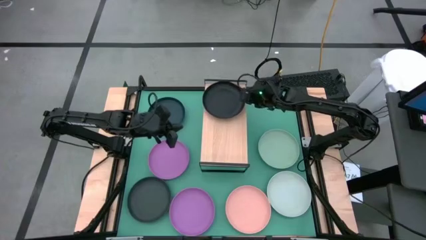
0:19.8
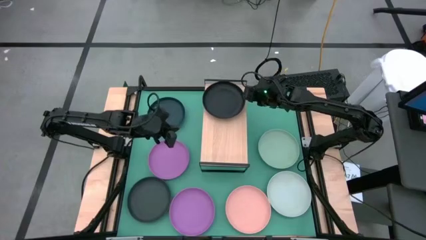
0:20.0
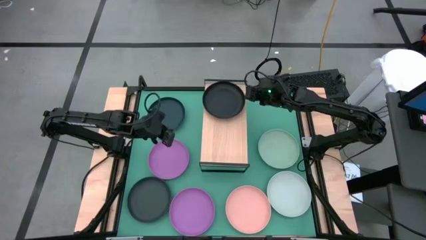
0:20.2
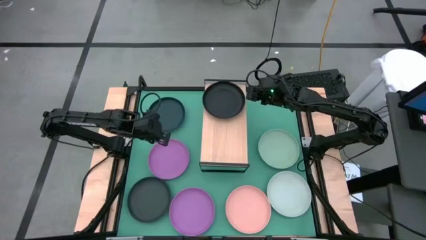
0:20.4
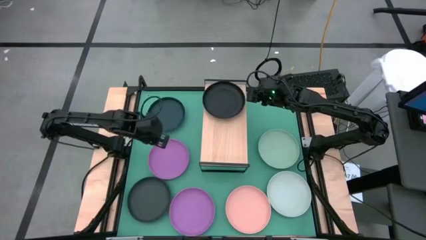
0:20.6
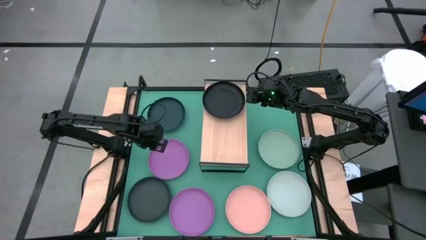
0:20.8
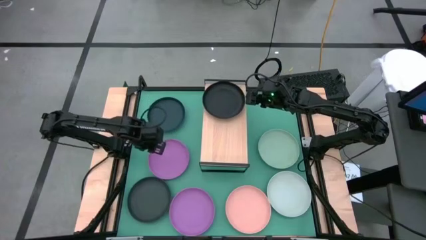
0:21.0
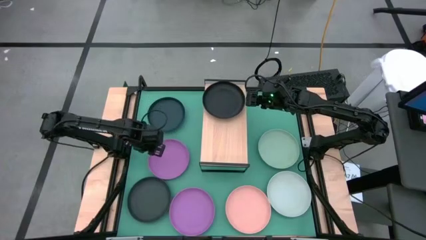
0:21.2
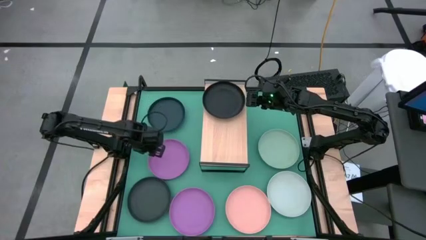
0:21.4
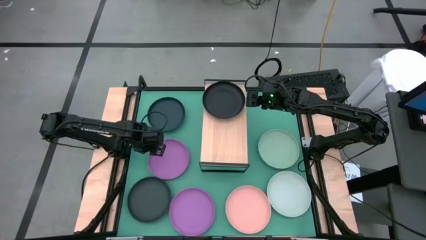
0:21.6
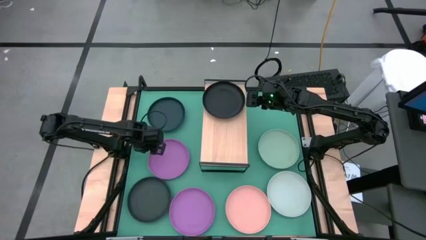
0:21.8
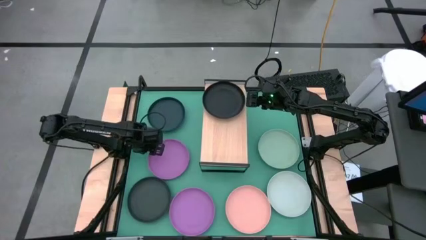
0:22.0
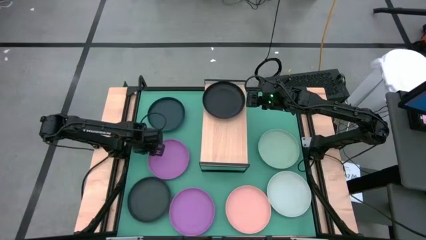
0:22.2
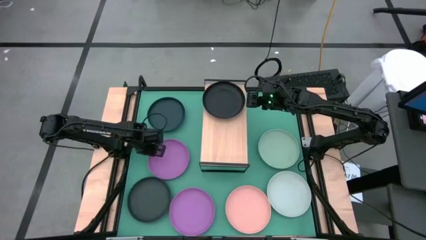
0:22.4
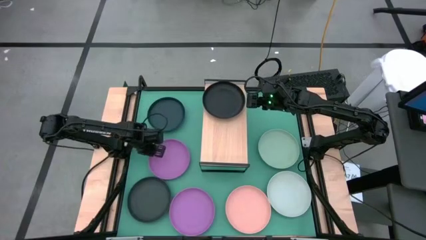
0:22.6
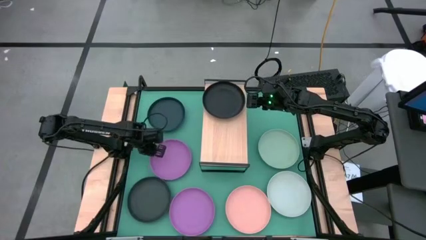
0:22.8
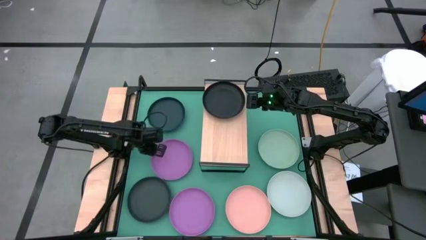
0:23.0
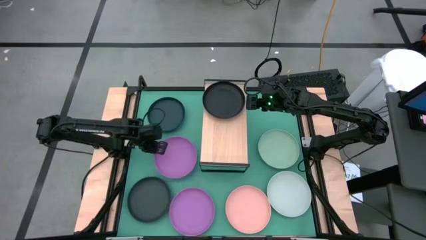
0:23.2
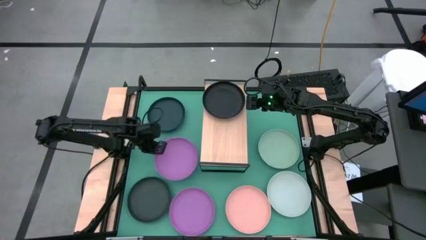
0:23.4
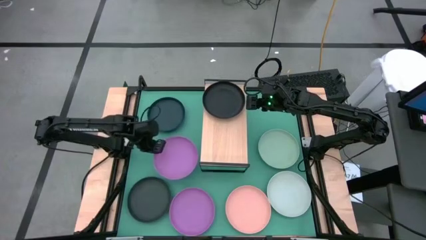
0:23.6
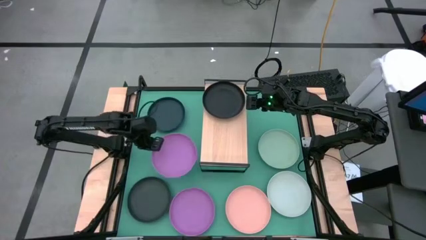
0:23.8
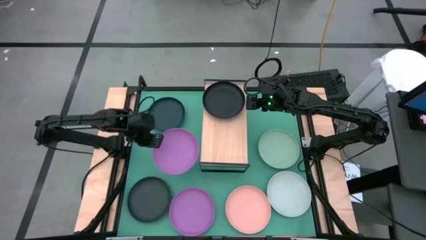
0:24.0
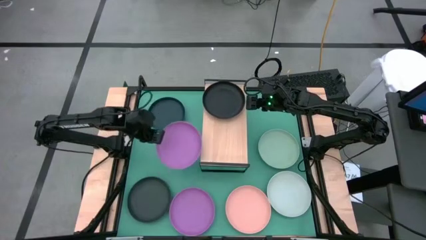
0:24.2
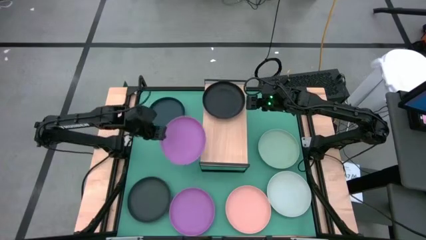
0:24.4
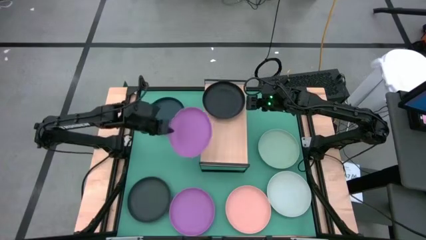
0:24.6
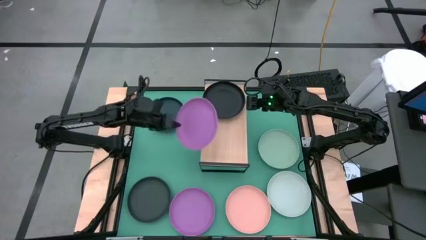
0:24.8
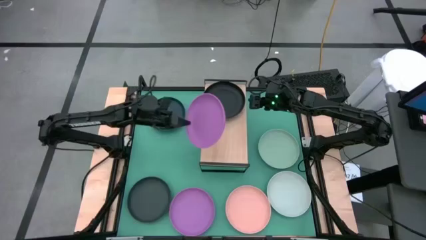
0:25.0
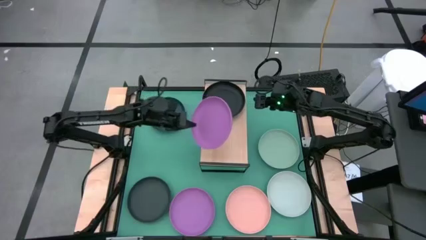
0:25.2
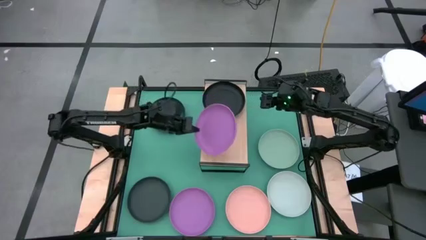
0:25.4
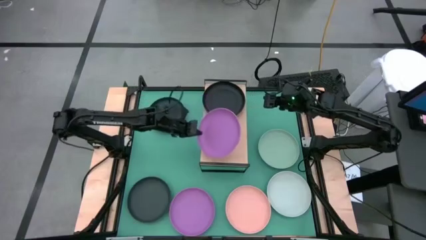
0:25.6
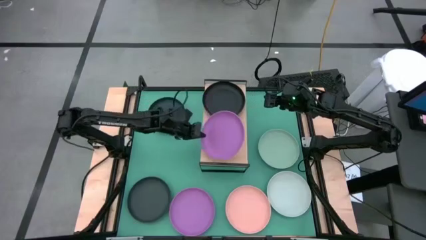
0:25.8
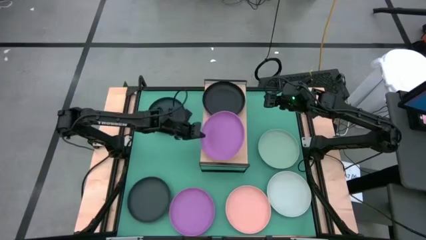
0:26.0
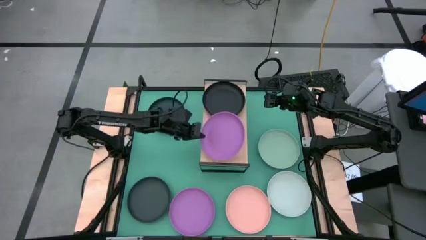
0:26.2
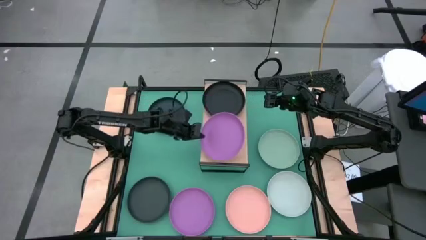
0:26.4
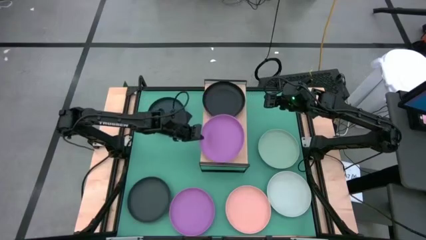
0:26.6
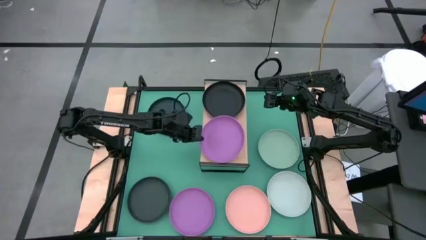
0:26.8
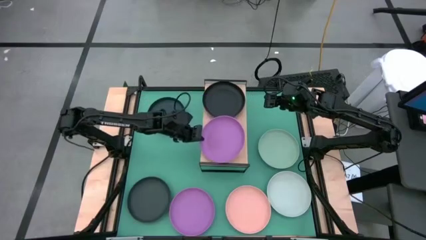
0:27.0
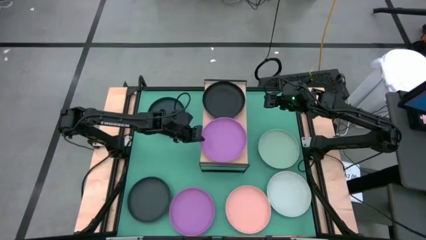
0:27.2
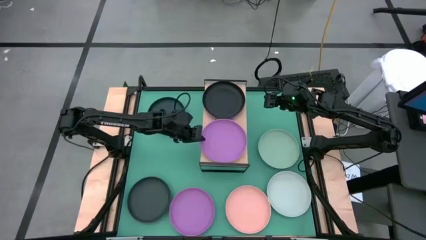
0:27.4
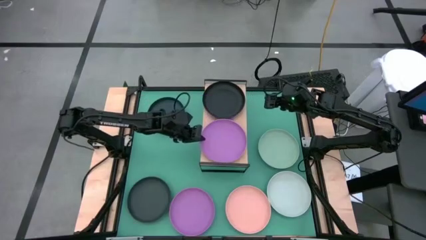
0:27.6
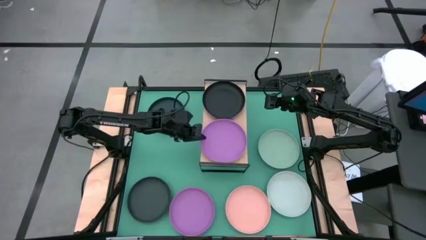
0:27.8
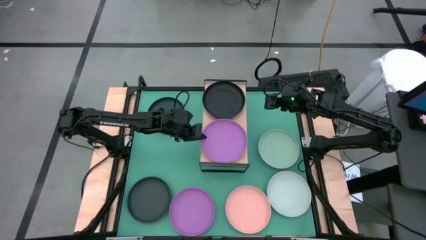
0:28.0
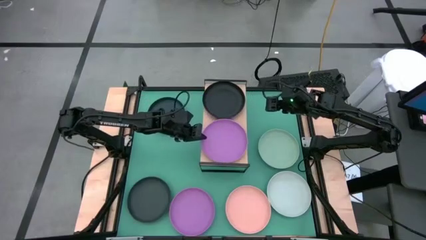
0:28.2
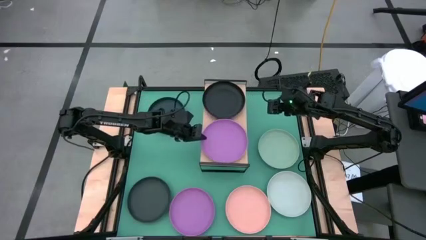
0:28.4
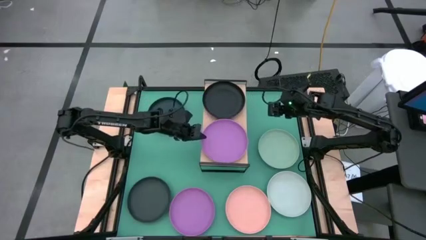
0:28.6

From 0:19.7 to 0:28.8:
Task: Place and stack plates onto a shelf
Put the top purple plate on the shelf

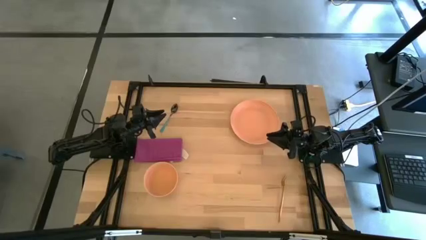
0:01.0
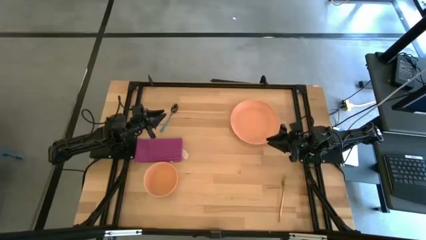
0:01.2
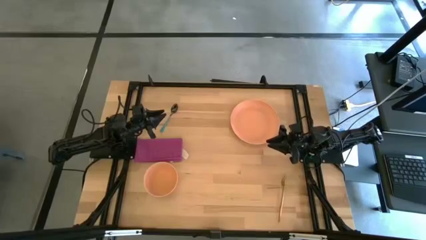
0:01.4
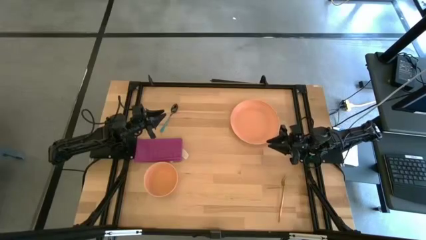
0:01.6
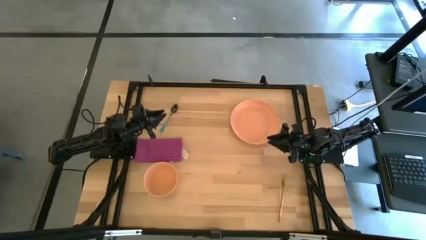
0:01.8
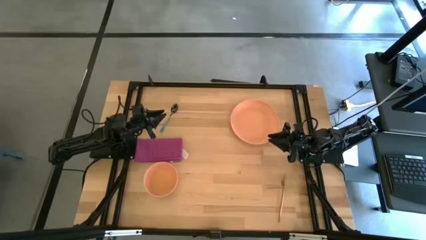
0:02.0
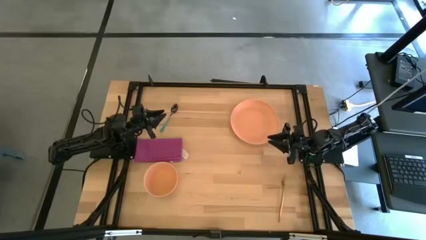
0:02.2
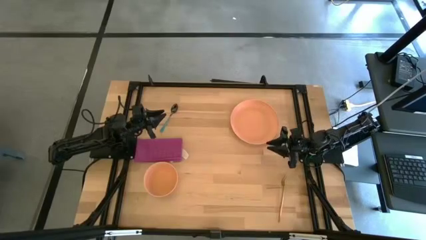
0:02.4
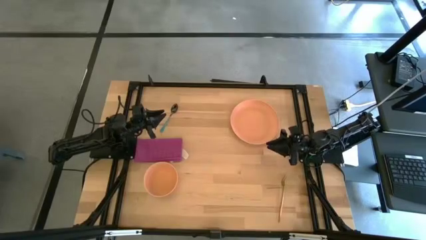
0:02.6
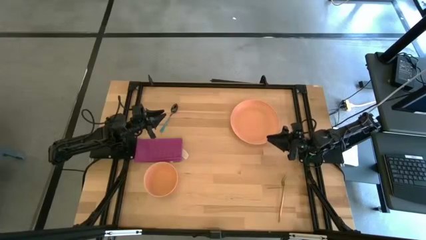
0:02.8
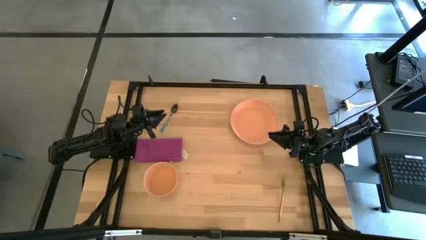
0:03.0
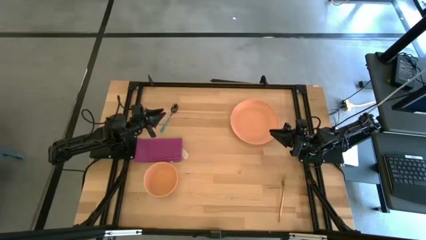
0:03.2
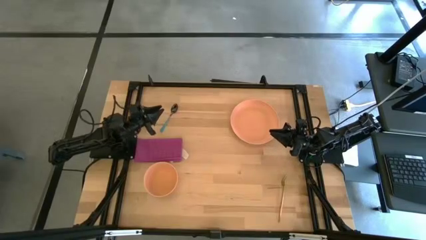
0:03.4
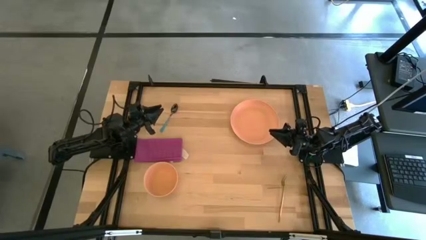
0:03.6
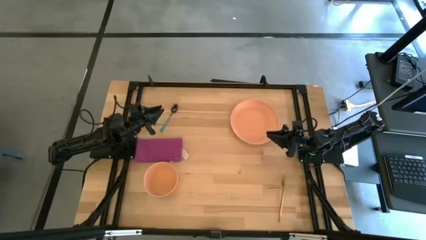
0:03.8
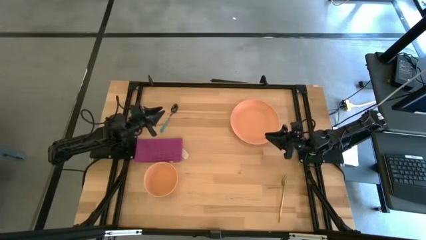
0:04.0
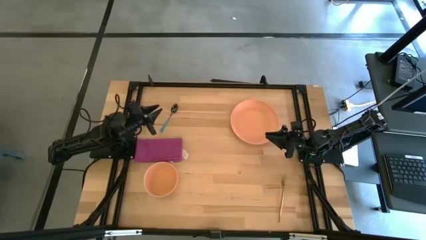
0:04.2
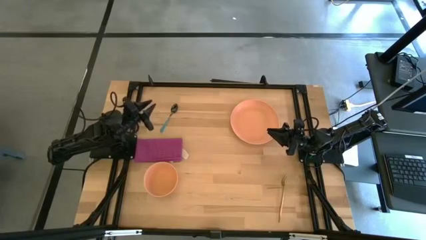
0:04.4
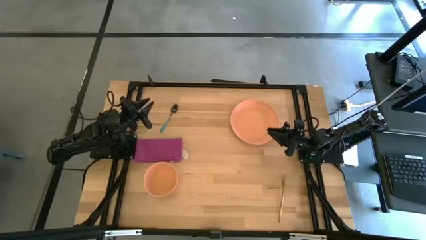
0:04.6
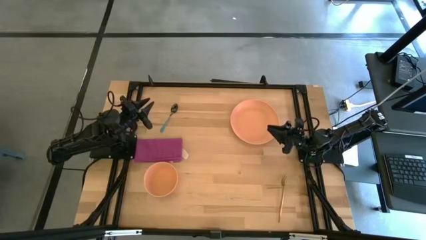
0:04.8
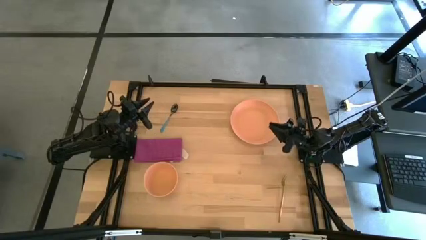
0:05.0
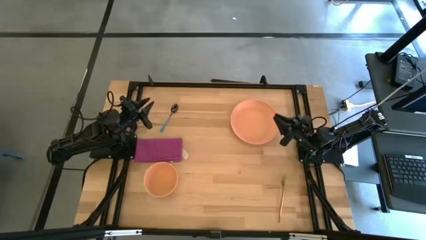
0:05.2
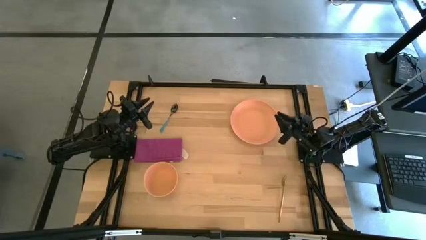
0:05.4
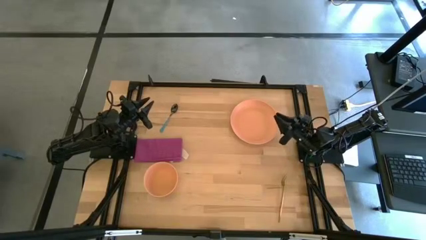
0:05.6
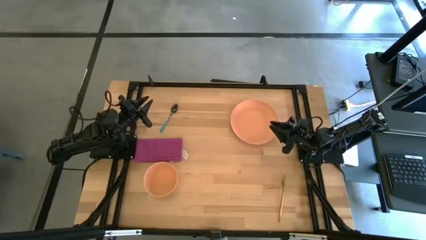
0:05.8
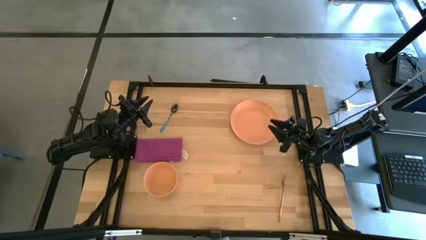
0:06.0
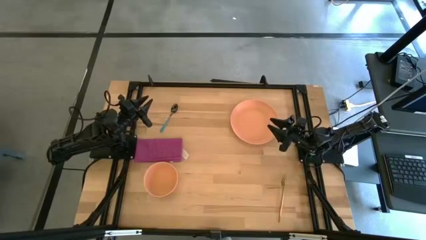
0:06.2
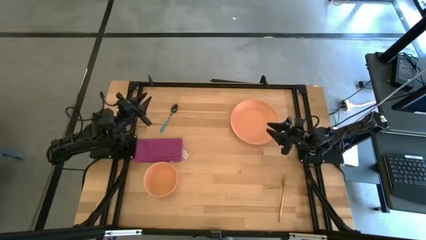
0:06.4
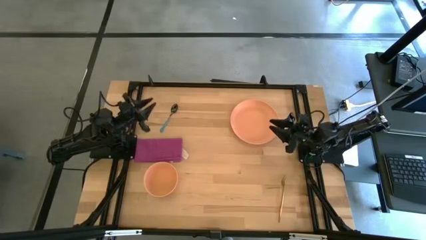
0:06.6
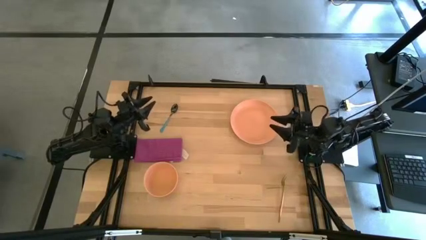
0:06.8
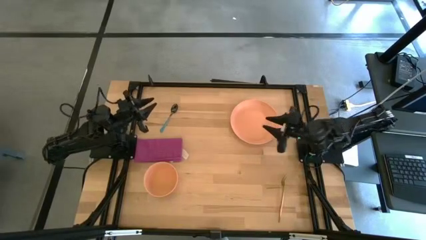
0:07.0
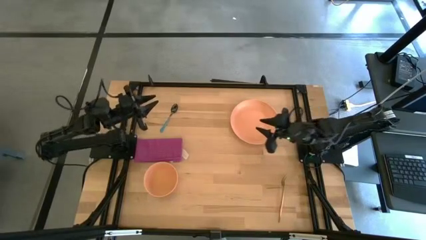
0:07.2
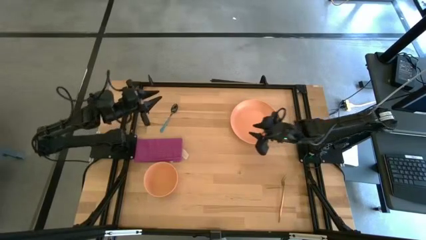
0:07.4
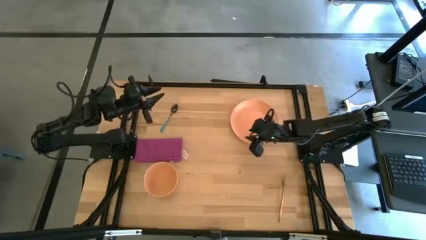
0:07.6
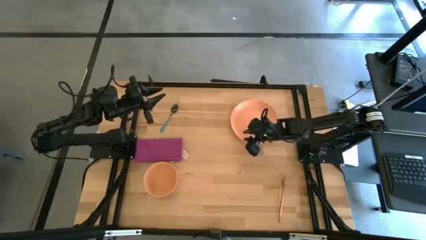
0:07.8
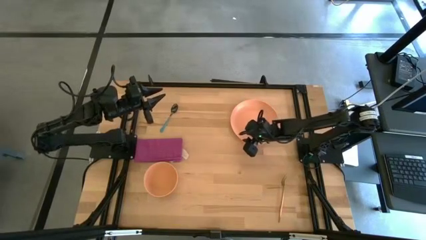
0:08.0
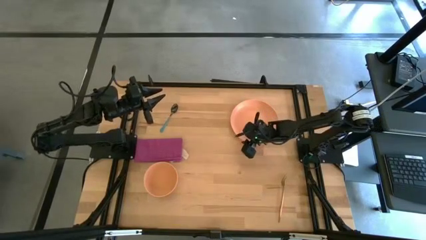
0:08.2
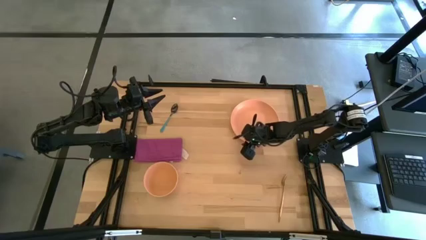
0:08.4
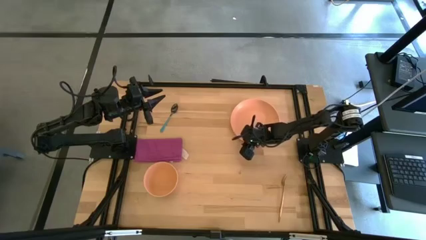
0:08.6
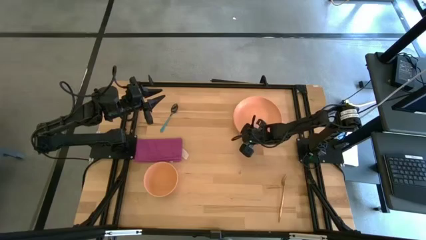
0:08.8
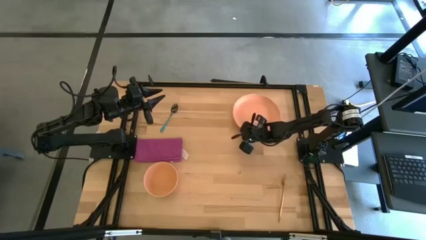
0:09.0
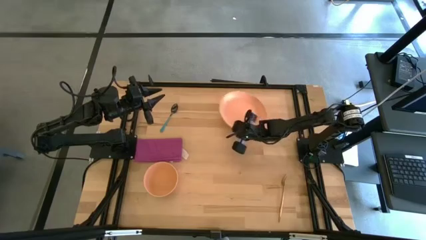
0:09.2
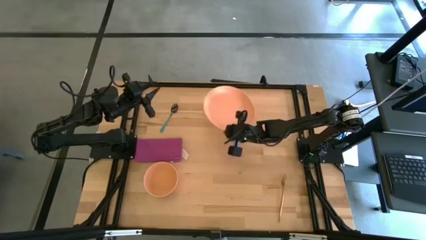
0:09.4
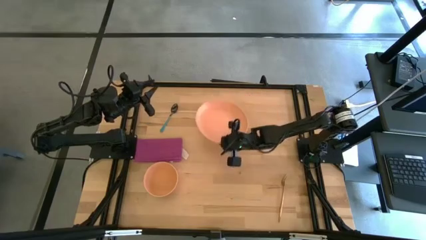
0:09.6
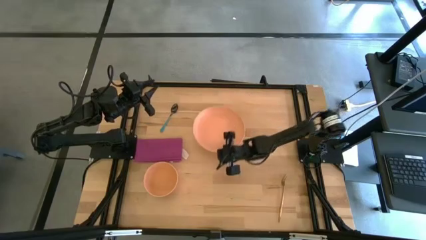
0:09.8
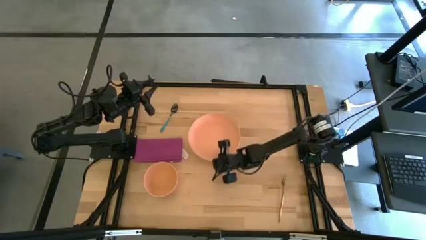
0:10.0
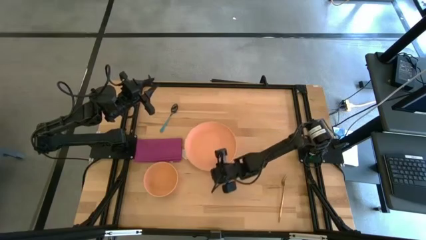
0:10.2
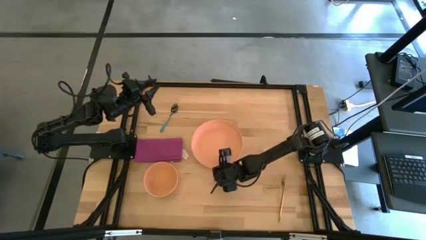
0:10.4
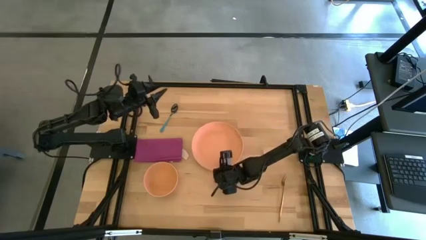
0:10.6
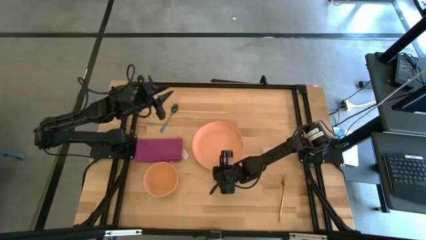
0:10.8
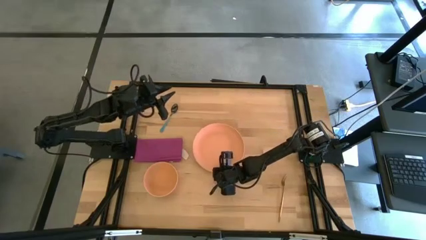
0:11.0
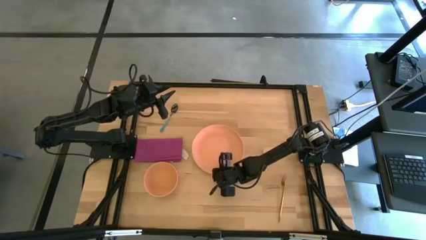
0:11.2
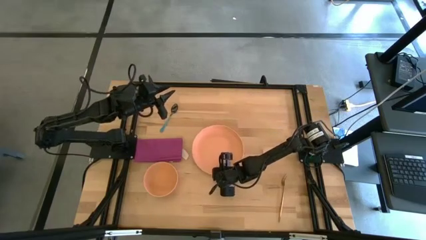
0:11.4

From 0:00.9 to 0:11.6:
Task: Set table place
Move the orange plate to the center of the table
